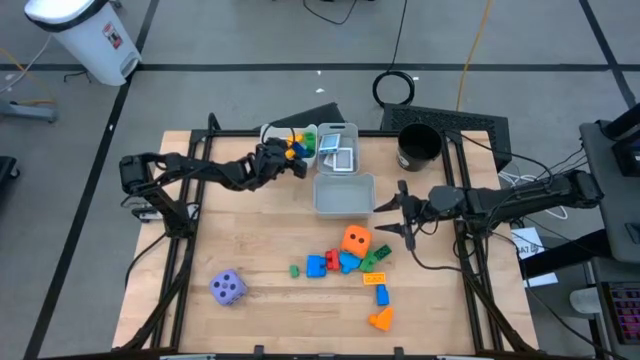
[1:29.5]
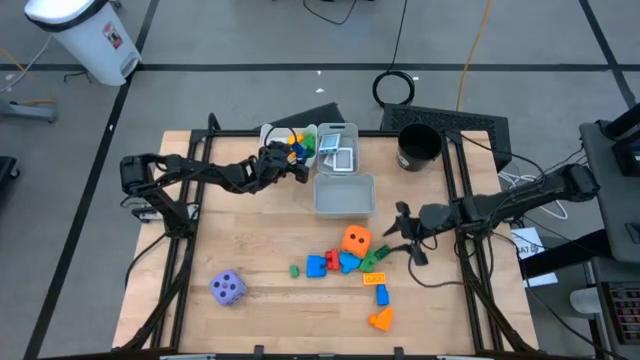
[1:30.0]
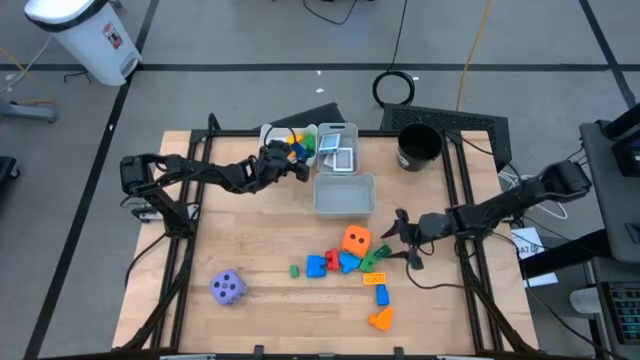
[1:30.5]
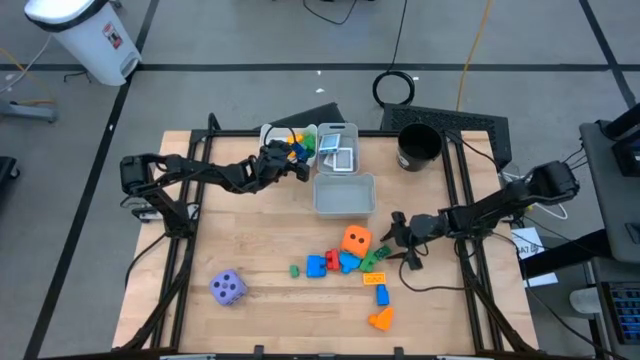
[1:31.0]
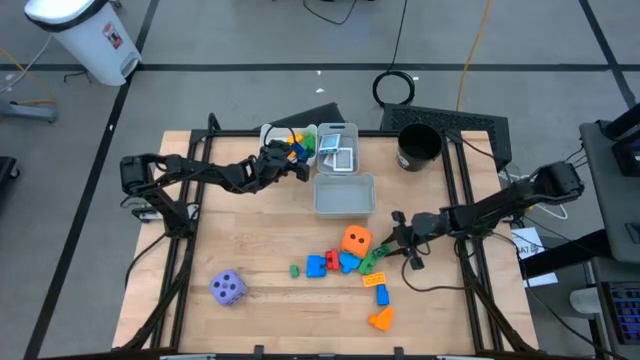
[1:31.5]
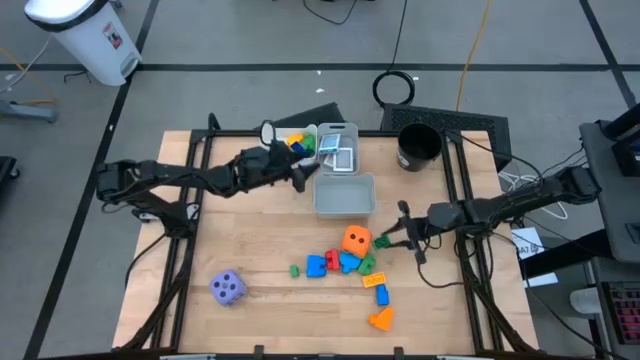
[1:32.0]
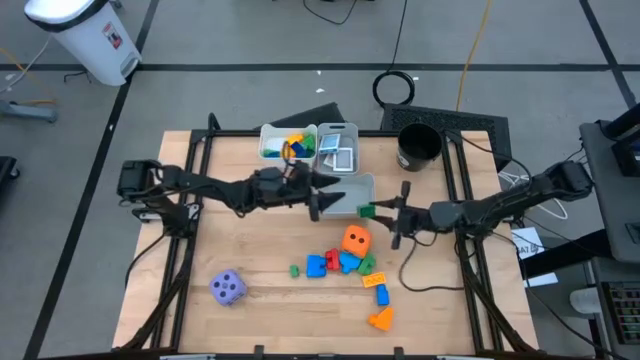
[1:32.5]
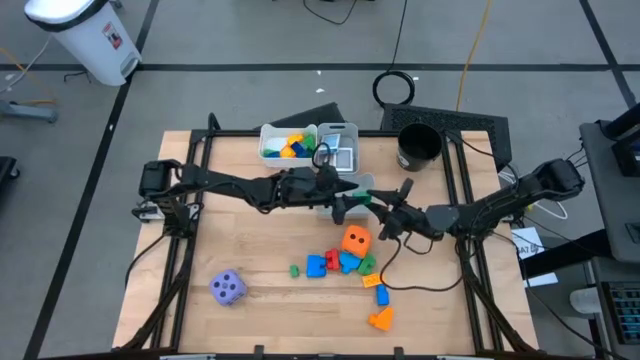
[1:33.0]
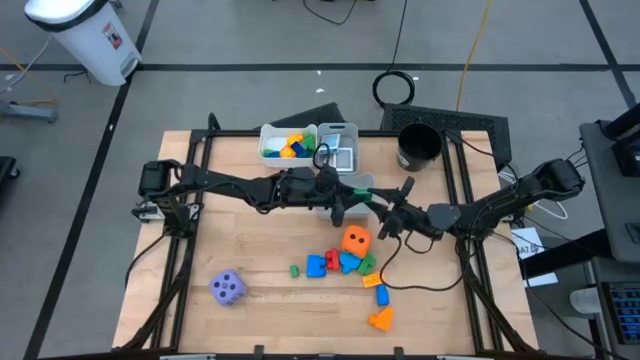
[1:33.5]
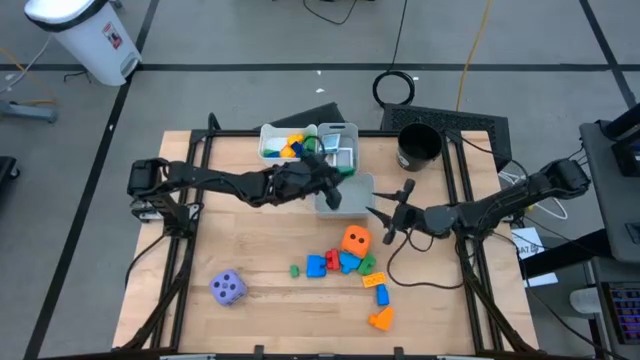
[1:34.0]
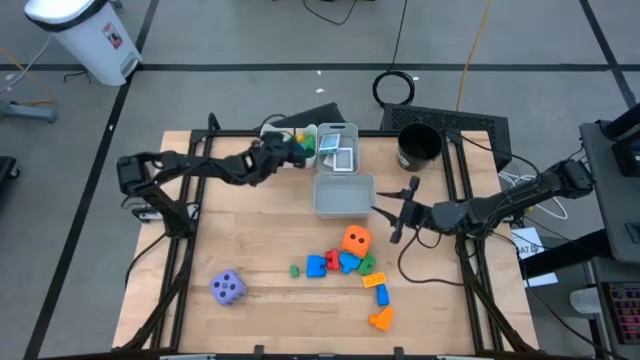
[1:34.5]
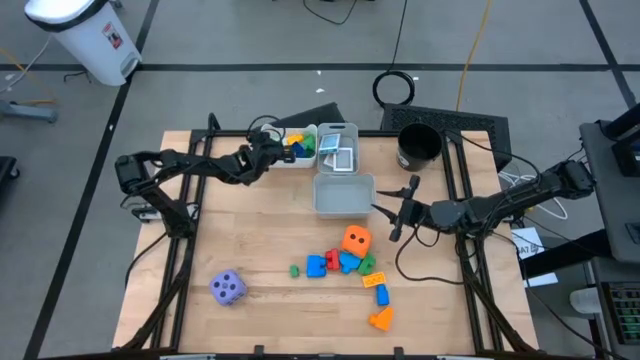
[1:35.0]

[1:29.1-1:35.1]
Task: Pick & Place Toys
Put the green game piece into the white bin

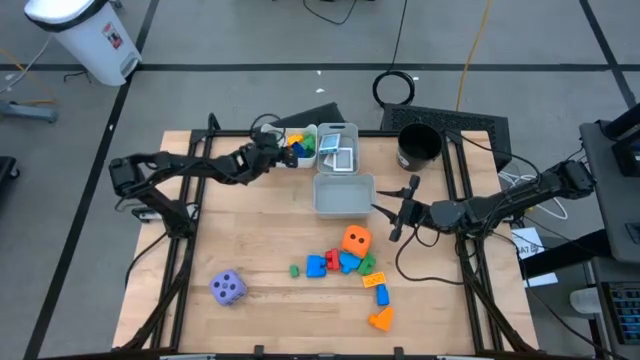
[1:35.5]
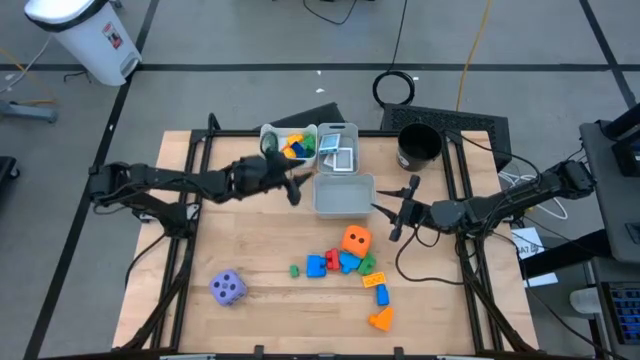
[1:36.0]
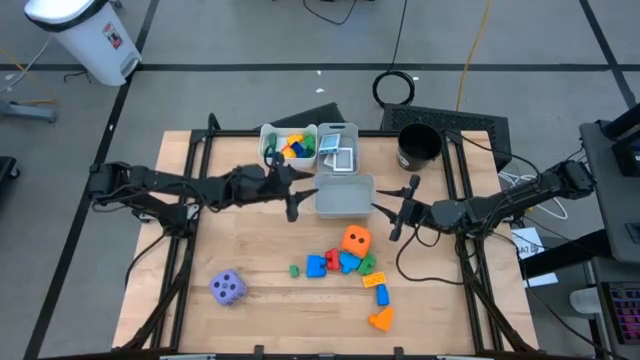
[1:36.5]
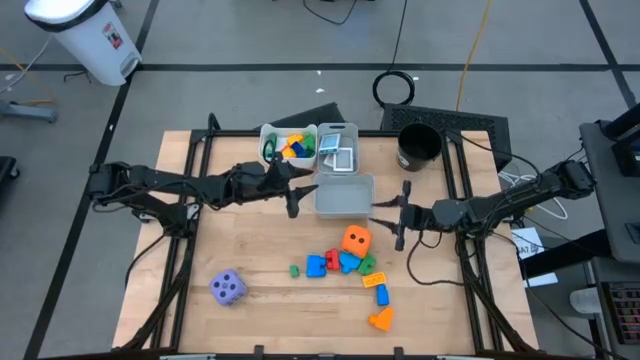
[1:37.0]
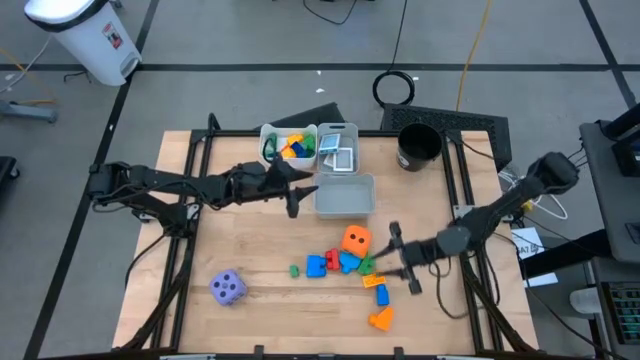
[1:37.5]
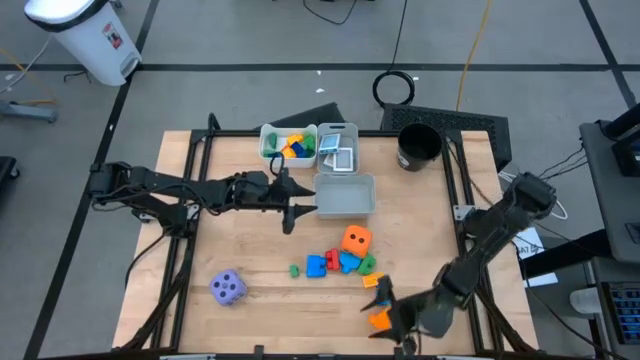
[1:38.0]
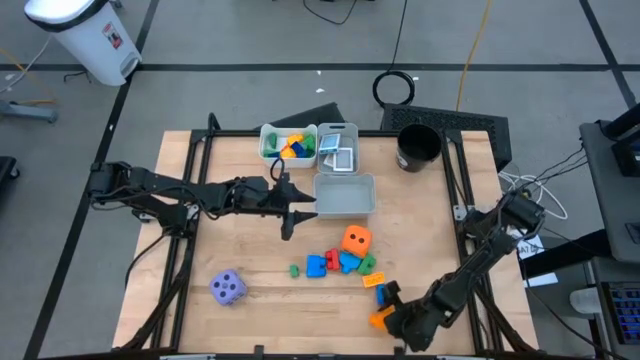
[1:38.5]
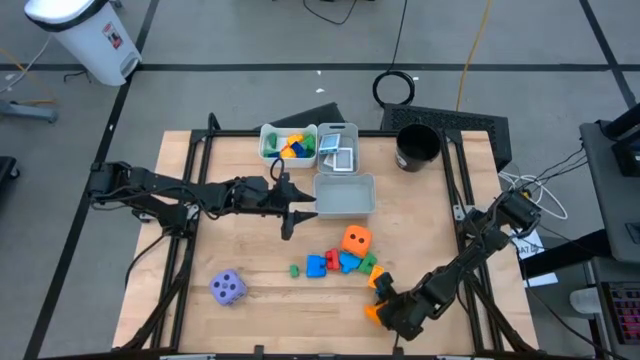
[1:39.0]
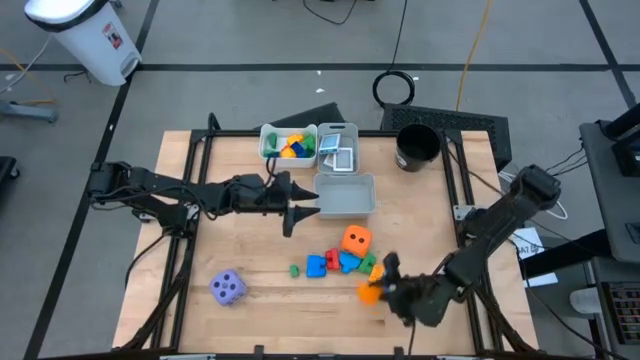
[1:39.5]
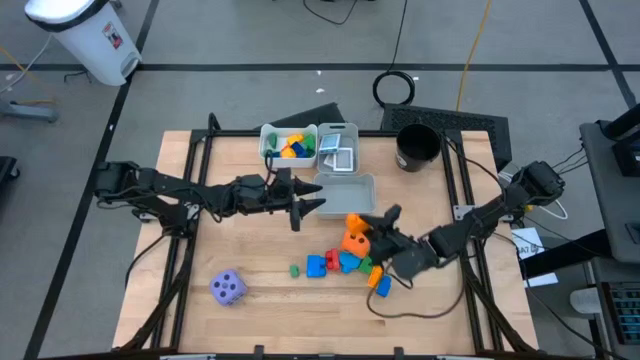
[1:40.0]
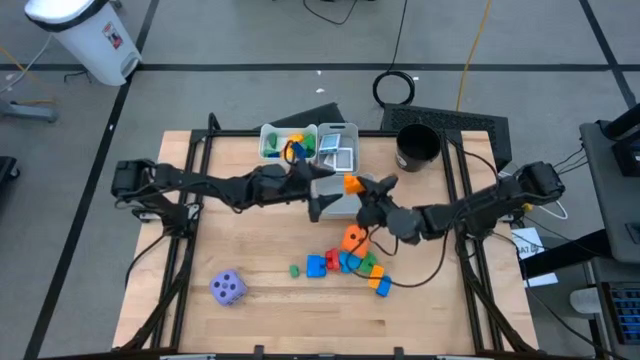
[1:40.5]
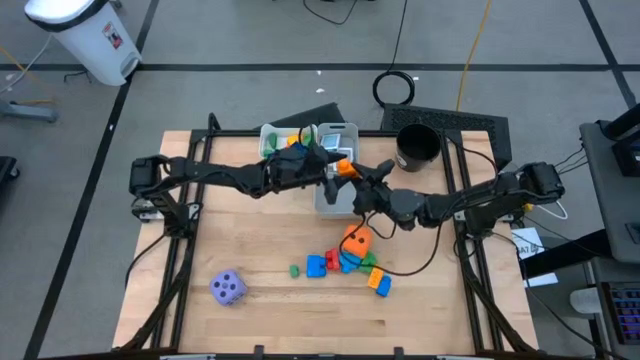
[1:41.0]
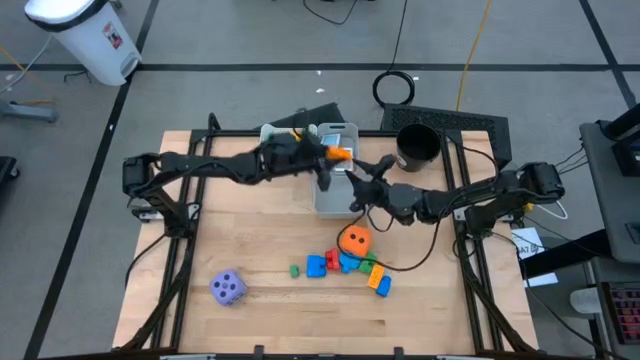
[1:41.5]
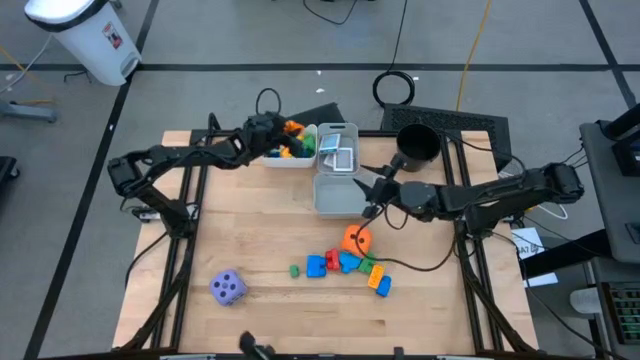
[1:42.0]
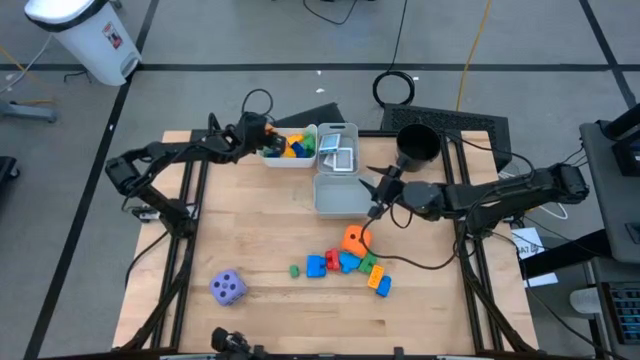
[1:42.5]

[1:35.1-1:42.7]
Put the orange game piece into the white bin

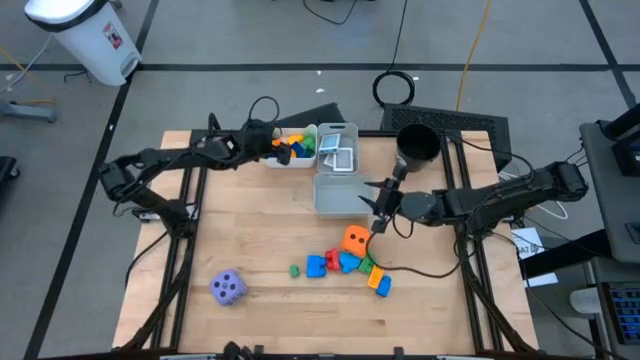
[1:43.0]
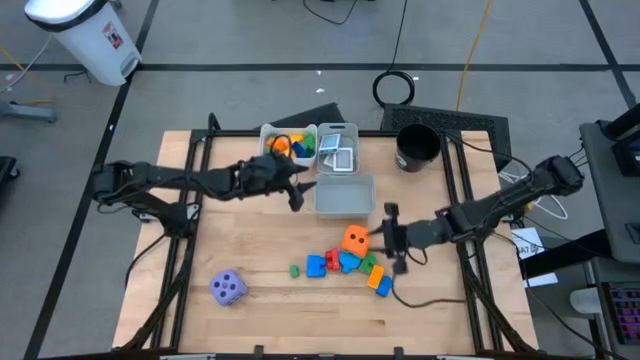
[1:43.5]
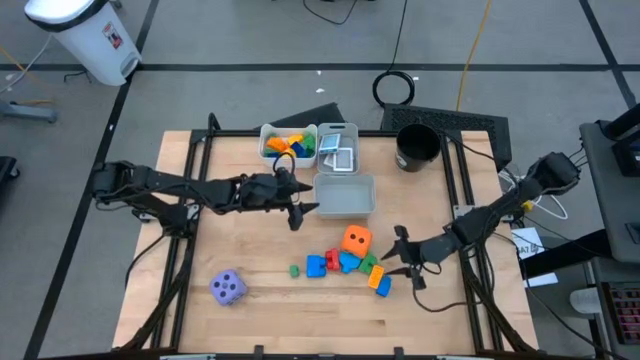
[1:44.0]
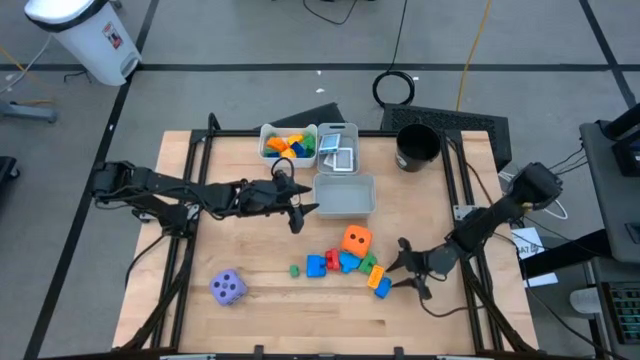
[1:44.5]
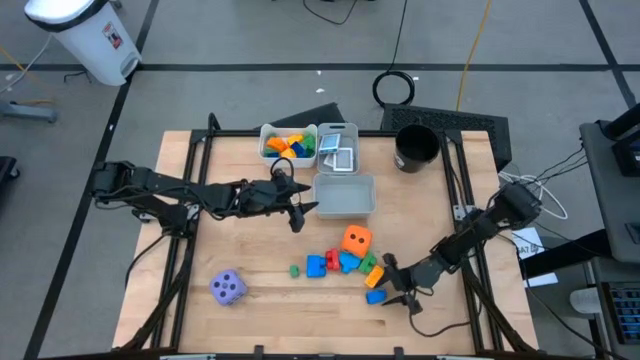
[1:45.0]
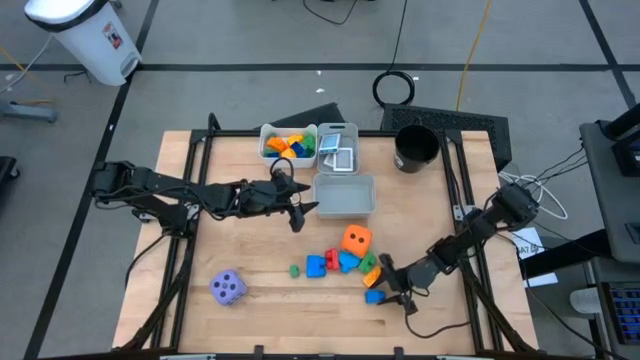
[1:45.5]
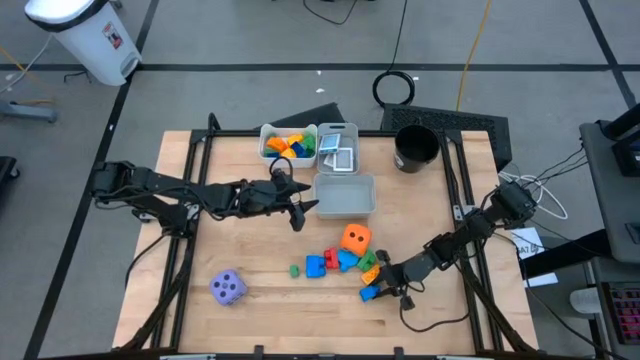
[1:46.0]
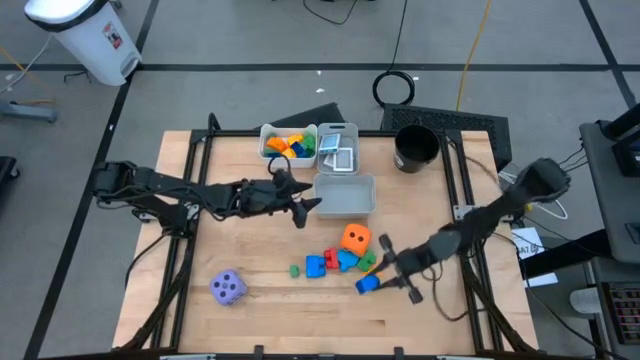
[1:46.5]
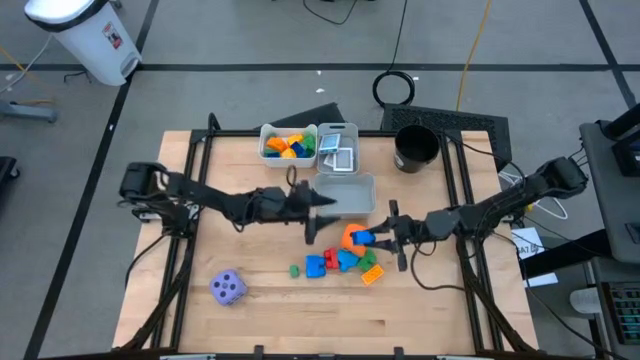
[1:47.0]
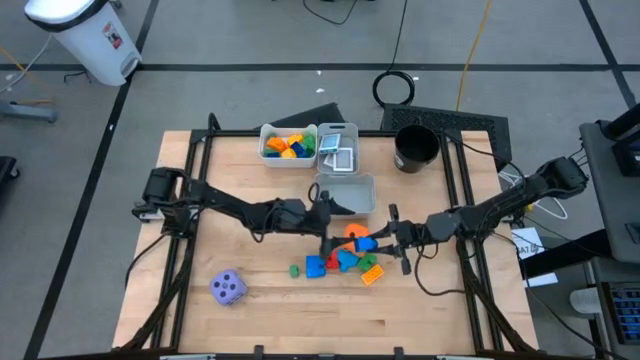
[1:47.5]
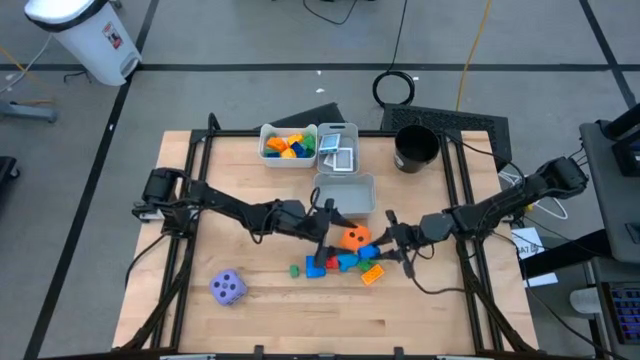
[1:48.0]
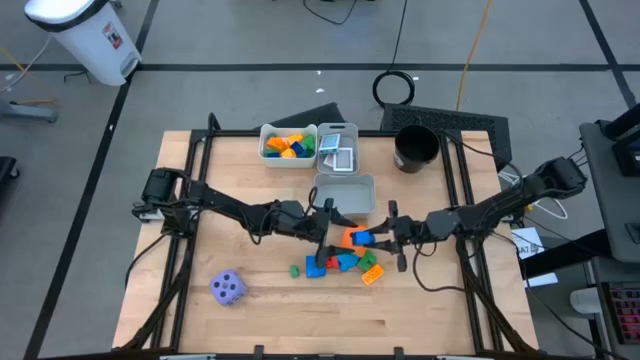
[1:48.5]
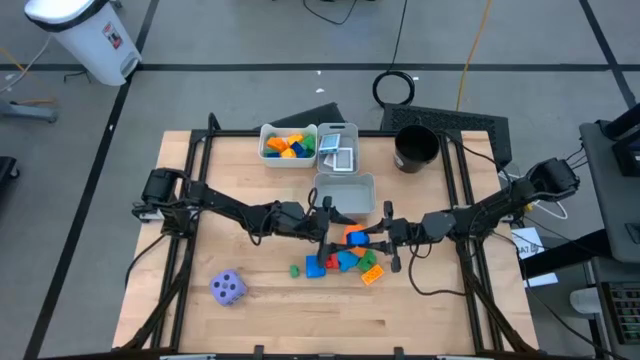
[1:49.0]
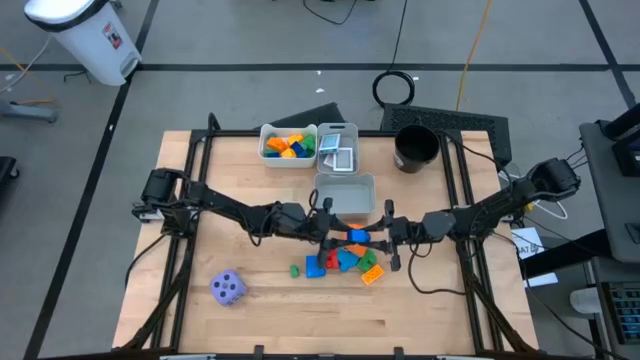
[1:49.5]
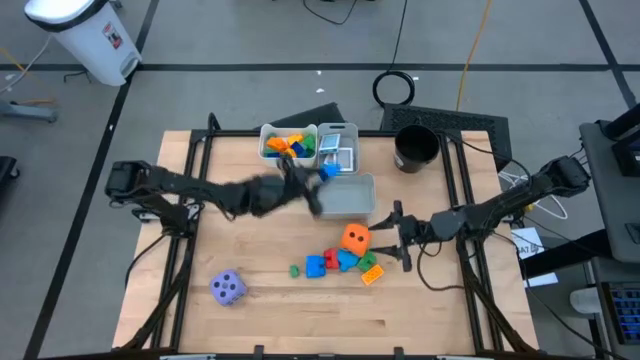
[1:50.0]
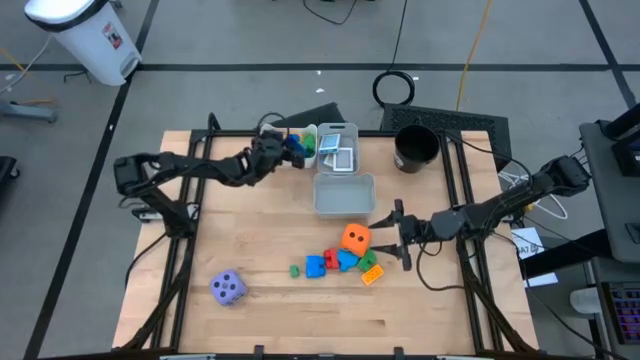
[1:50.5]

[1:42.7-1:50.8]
Put the blue game piece into the white bin
